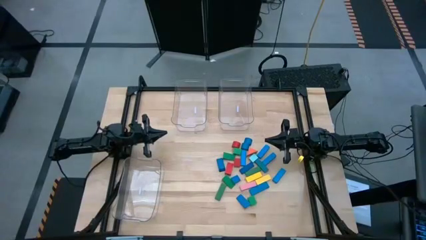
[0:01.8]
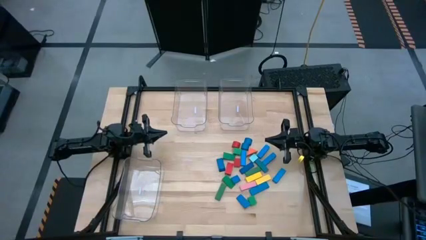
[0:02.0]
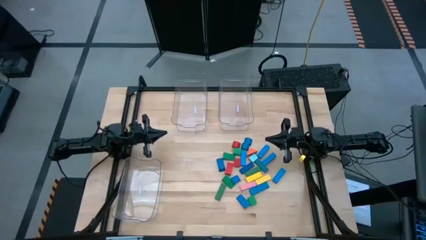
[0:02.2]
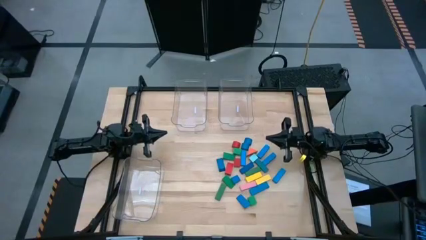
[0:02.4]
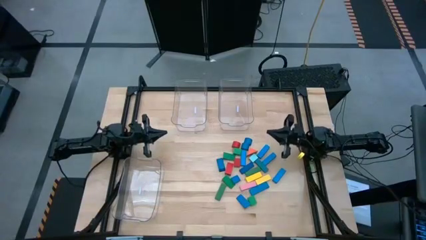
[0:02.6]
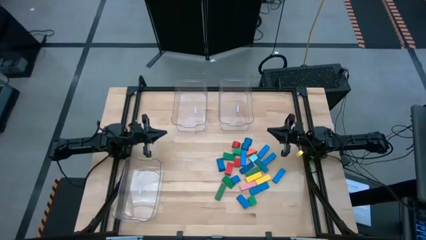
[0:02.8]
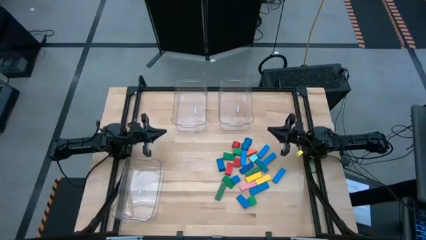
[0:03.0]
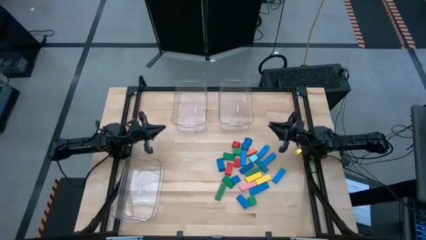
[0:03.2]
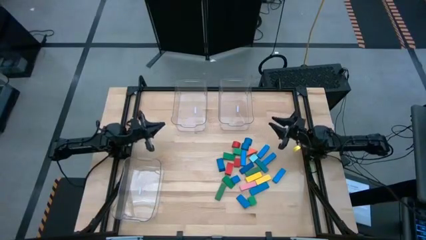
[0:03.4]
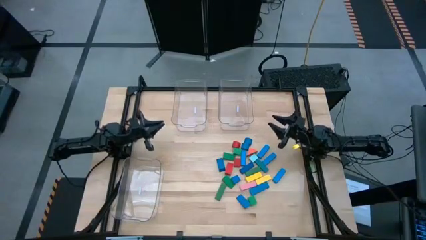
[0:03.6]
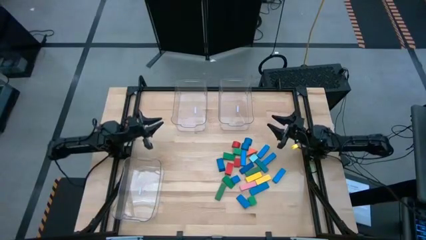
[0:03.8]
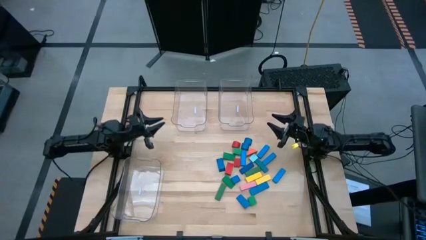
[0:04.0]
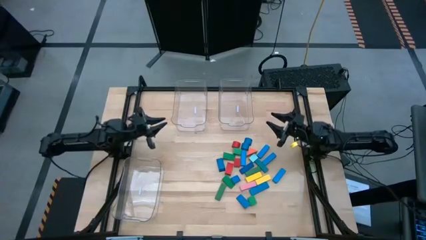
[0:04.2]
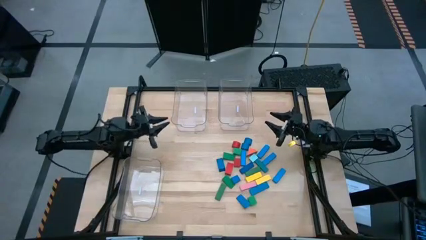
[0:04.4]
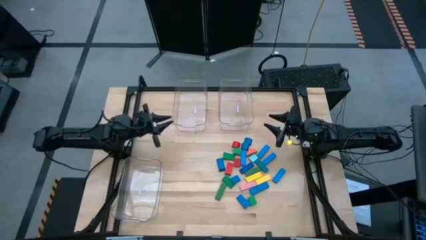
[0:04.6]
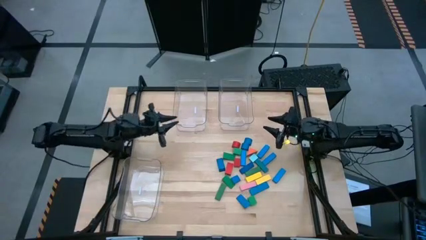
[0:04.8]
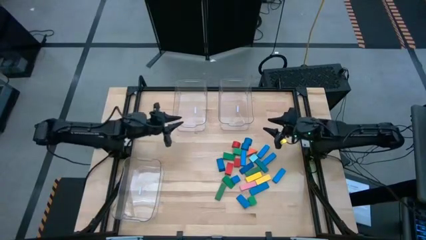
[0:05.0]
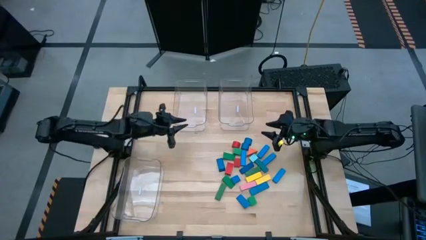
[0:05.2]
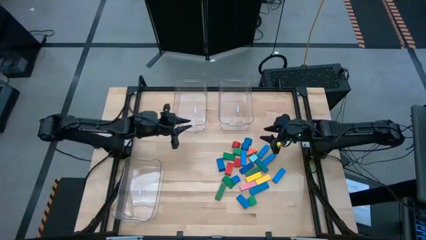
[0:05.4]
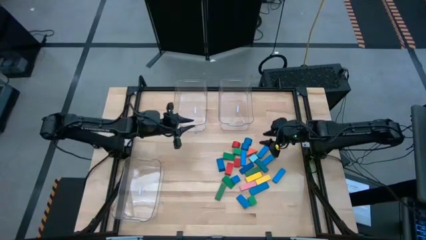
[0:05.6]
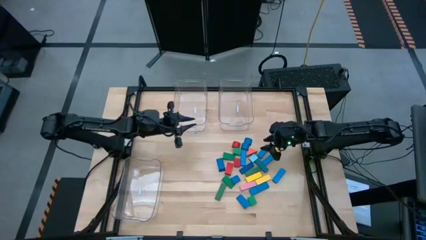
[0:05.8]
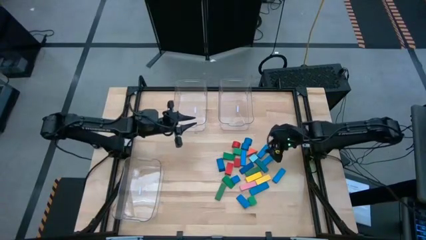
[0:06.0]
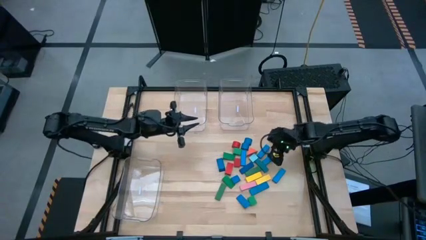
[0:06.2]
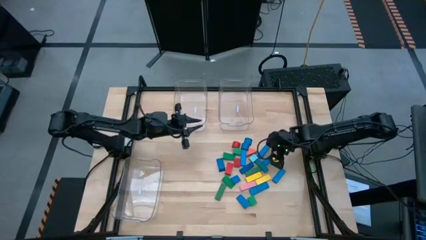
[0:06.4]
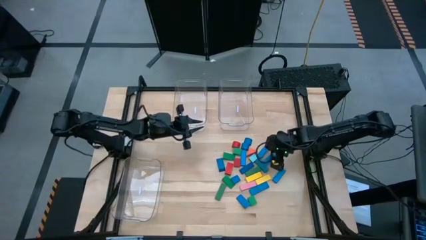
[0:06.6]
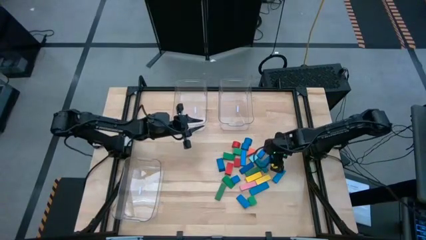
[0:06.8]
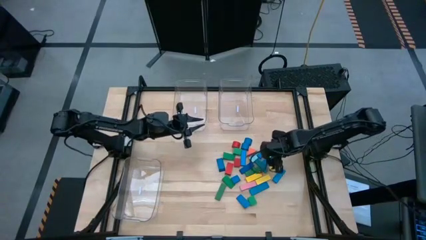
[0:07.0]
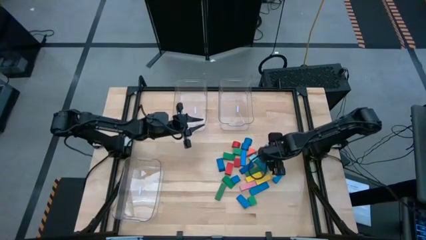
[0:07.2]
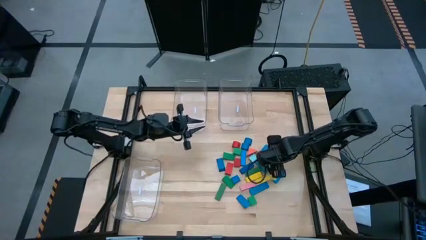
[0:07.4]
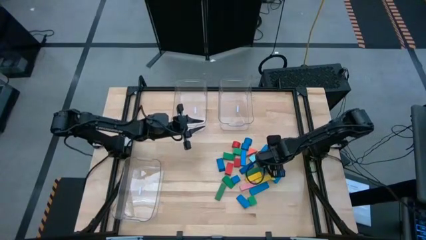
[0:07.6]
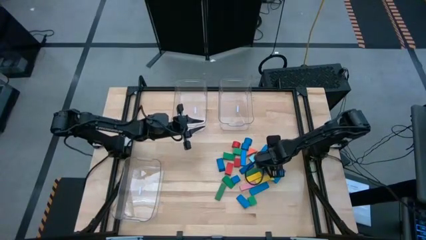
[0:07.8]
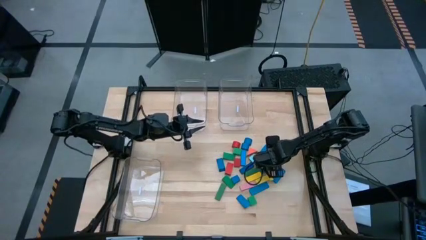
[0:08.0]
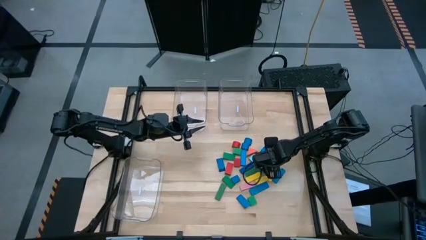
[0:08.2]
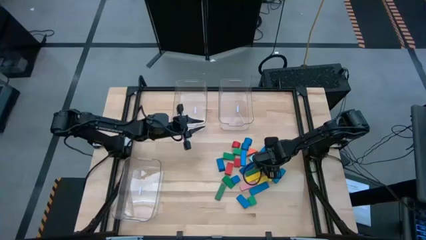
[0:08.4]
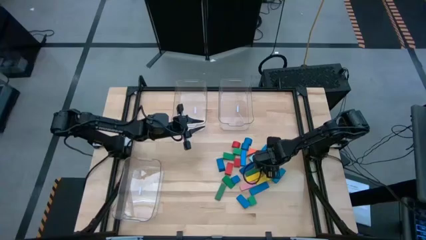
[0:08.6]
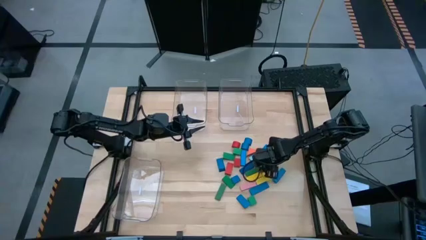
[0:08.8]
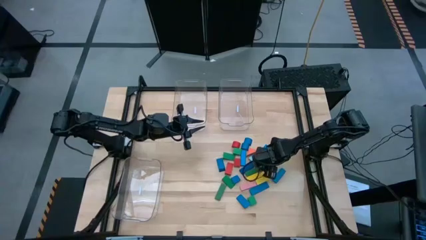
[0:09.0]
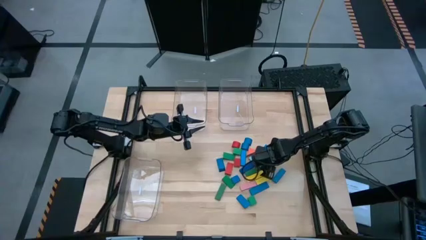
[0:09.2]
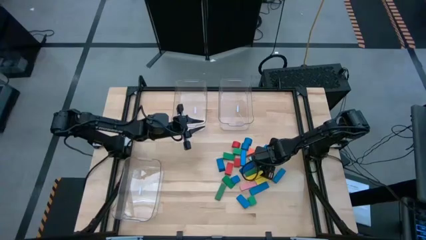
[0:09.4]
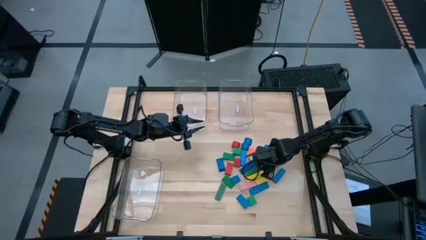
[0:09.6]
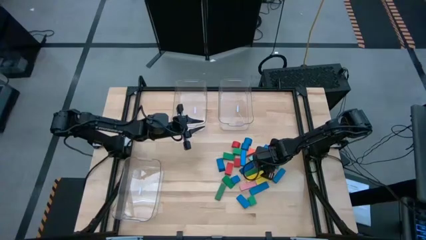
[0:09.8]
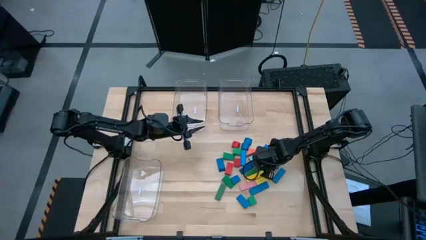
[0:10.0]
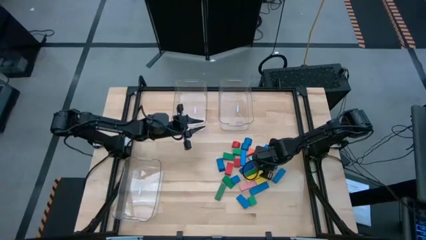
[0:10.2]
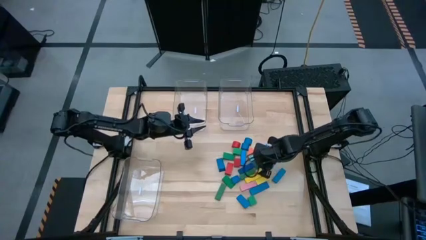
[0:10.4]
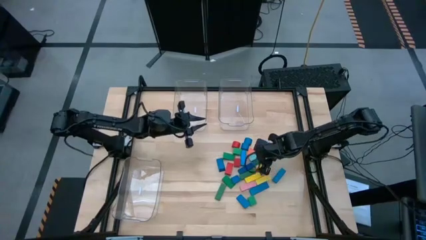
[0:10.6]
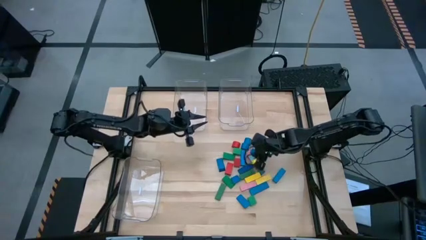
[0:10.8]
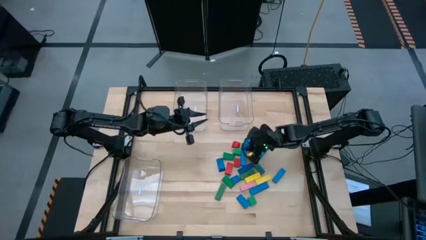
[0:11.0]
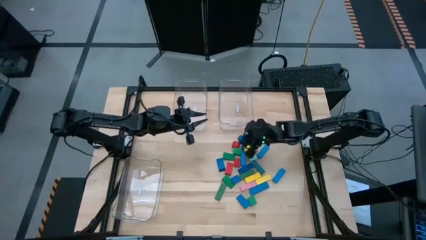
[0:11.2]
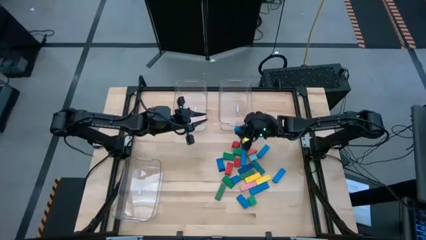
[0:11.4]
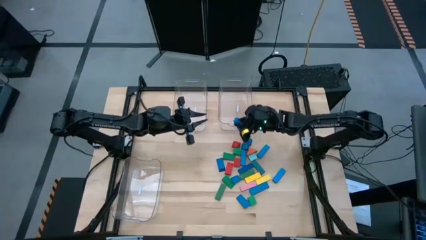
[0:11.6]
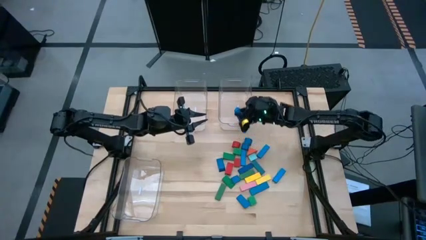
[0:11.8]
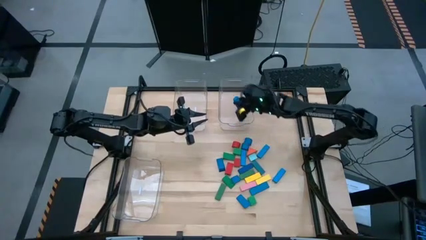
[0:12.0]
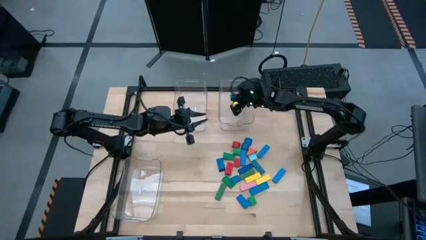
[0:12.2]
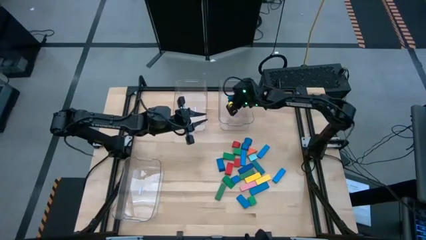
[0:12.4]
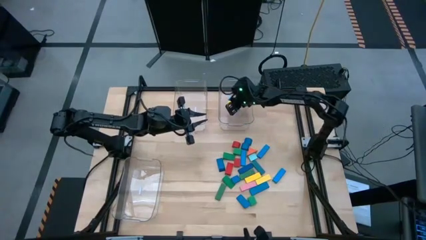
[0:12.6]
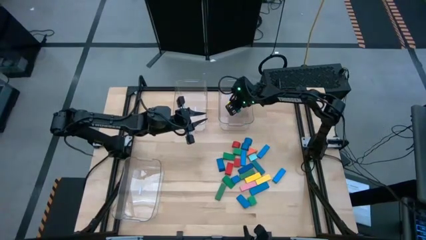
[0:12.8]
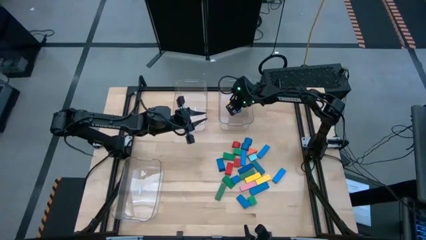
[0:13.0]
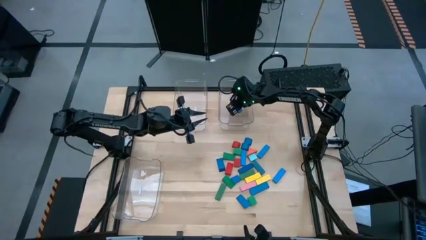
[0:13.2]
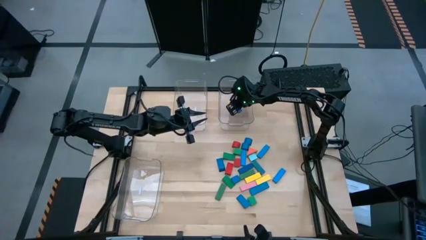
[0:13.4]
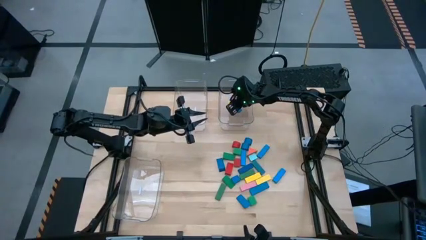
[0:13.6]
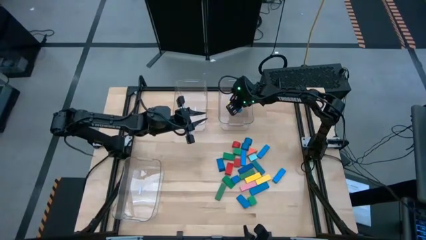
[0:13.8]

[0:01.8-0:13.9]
Task: Sort blocks by size
Put the blue rectangular block into the top right transparent bin
